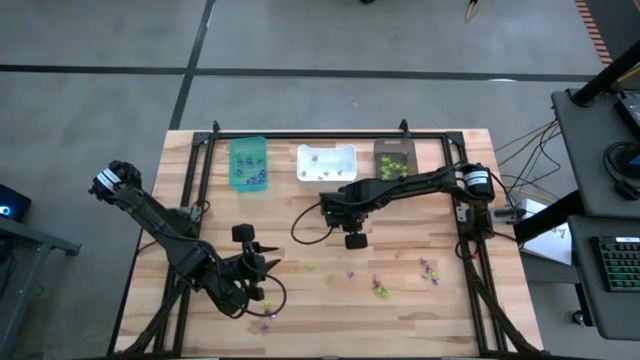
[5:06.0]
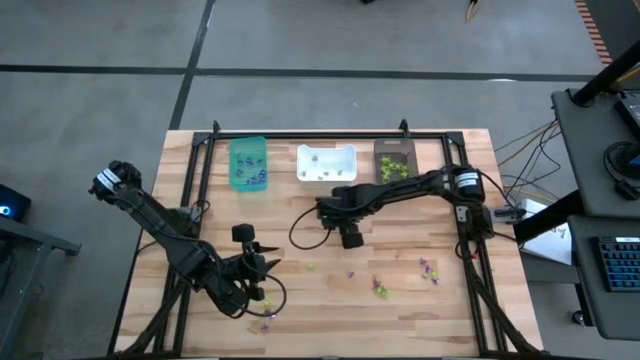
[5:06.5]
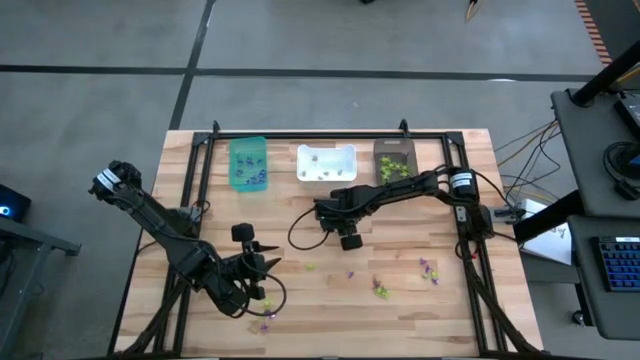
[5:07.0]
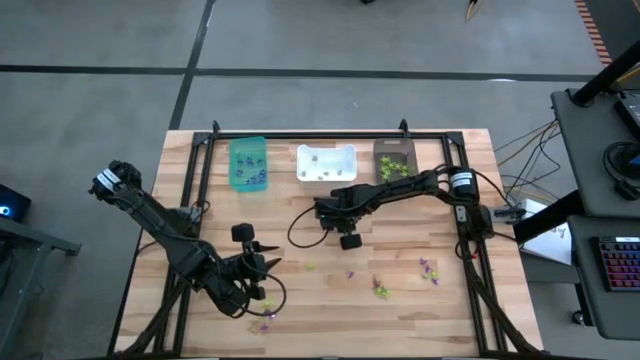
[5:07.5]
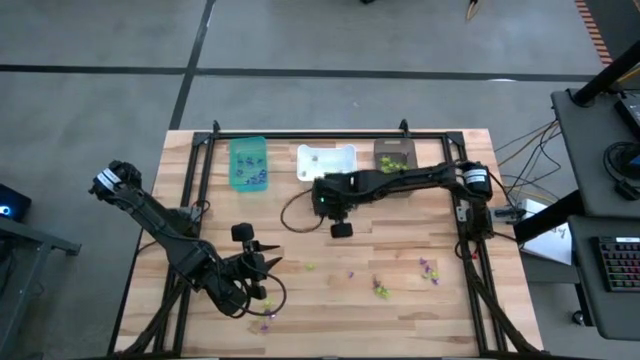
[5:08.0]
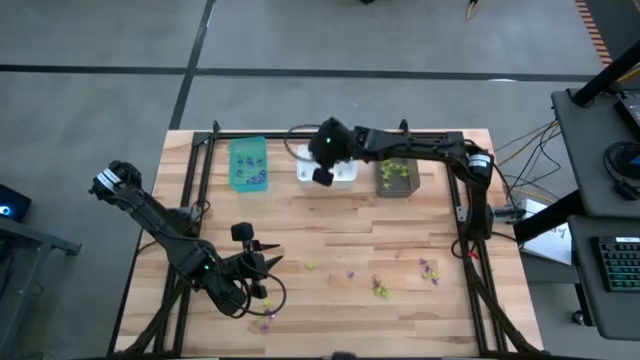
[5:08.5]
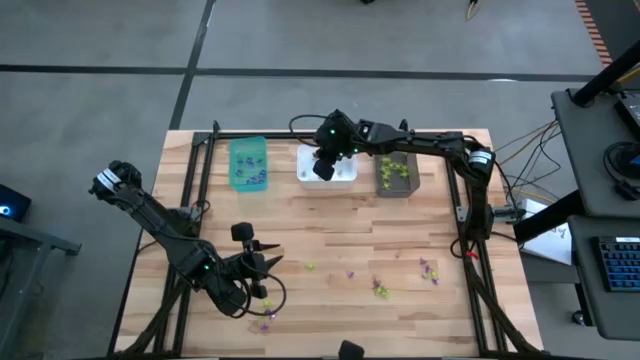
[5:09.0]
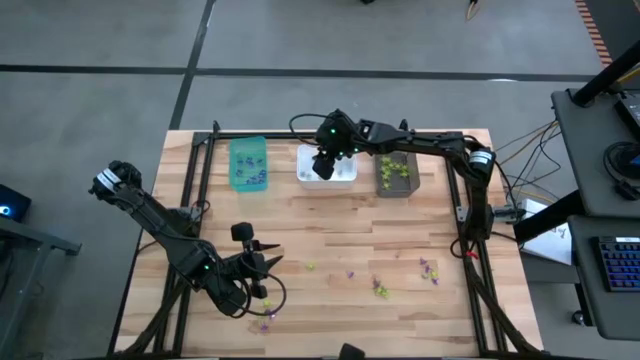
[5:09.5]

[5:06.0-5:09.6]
Task: Sort Halloween decoration
Put the white skull toy into the white bin

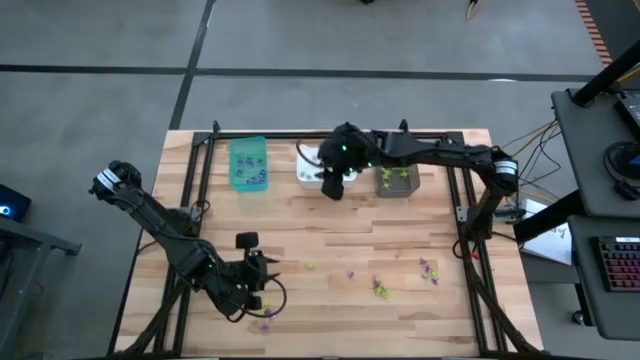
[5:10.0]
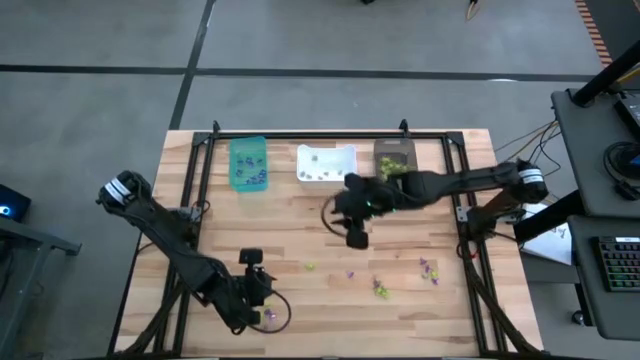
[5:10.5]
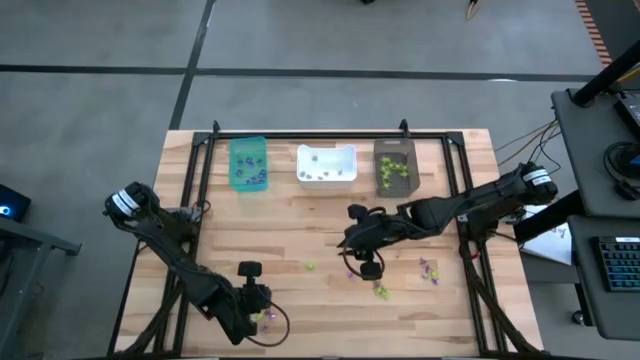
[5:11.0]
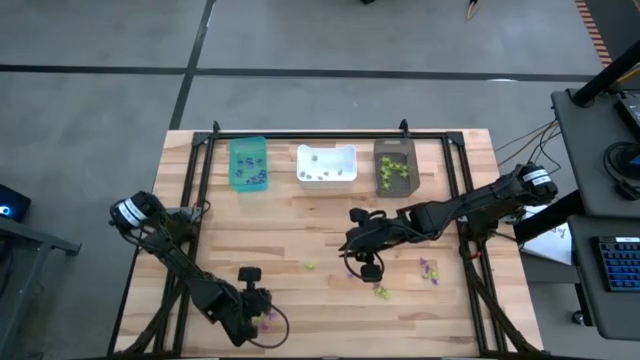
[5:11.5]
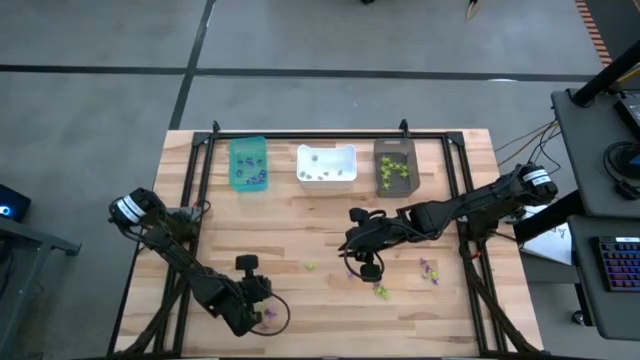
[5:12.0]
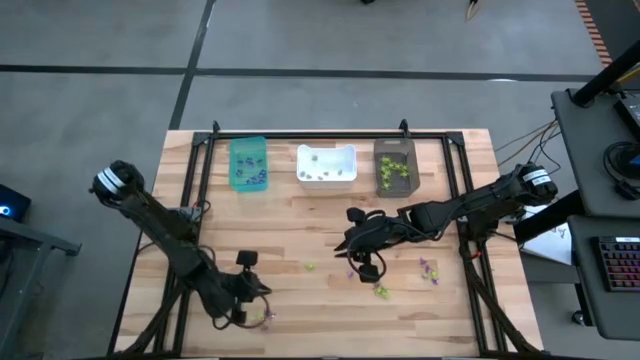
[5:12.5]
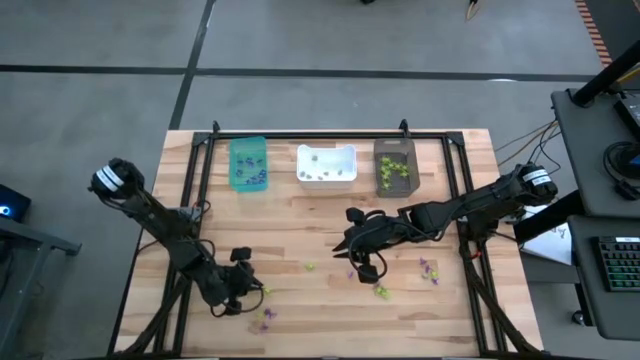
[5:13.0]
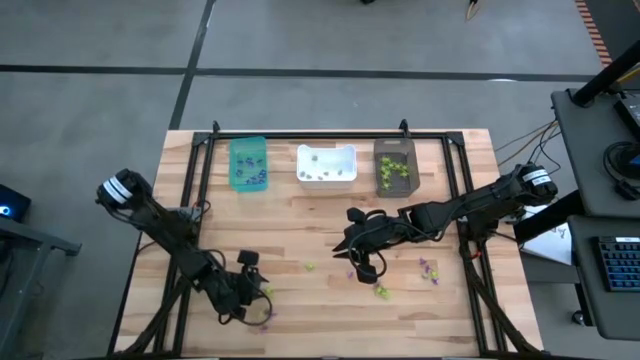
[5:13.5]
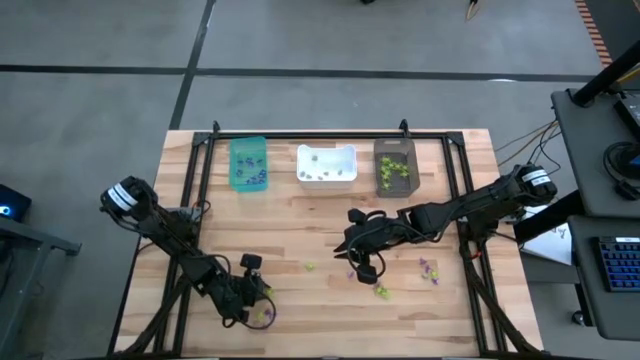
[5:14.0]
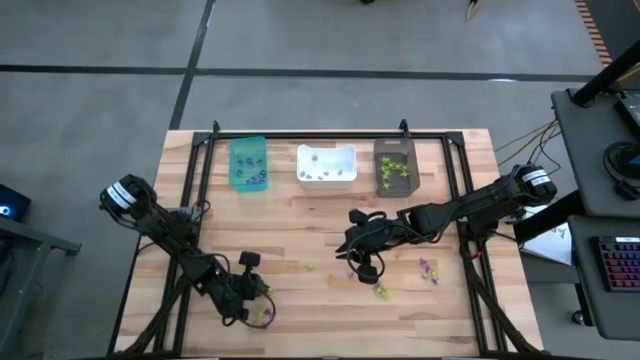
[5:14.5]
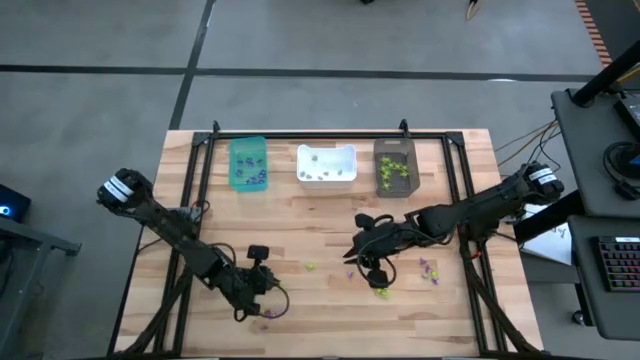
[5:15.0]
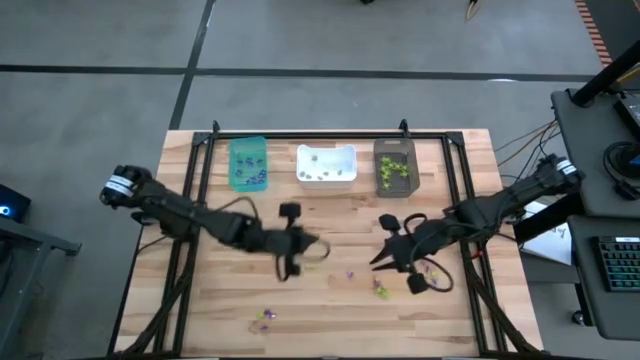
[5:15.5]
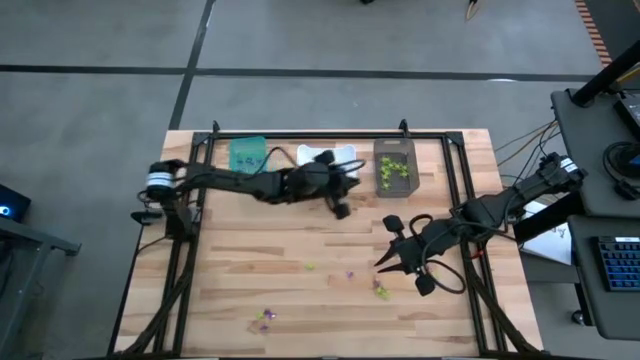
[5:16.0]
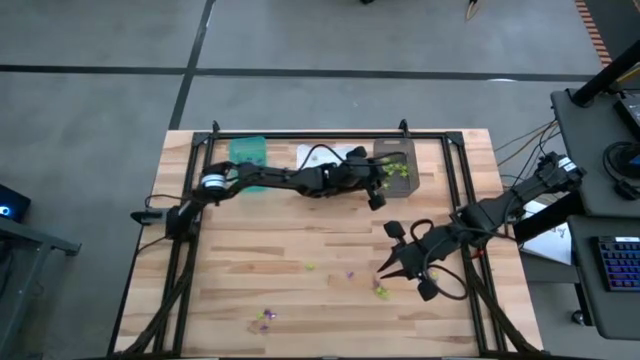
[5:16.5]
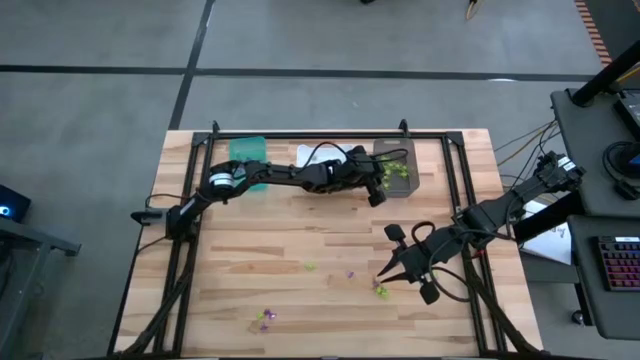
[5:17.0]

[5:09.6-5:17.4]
Put the green spider toy into the black bin

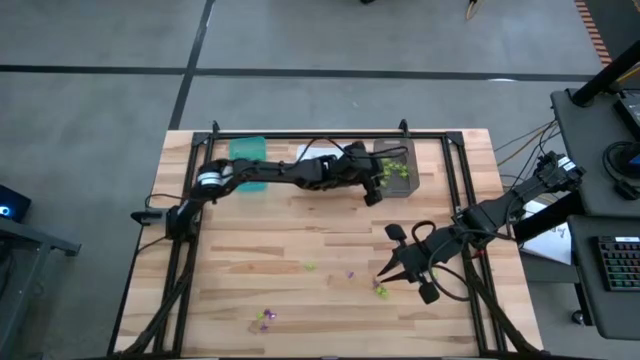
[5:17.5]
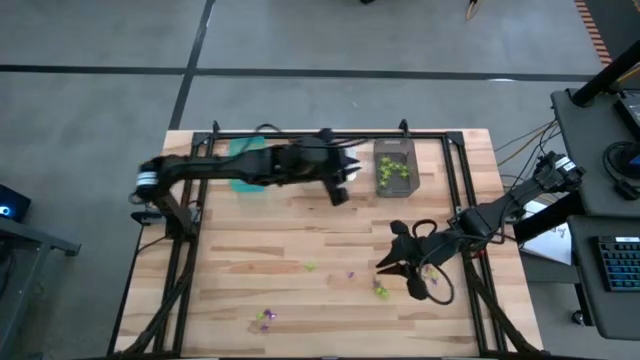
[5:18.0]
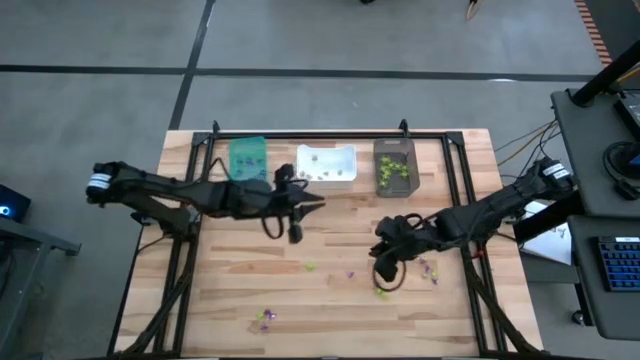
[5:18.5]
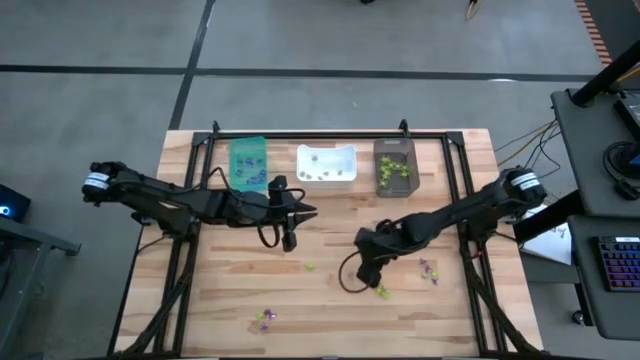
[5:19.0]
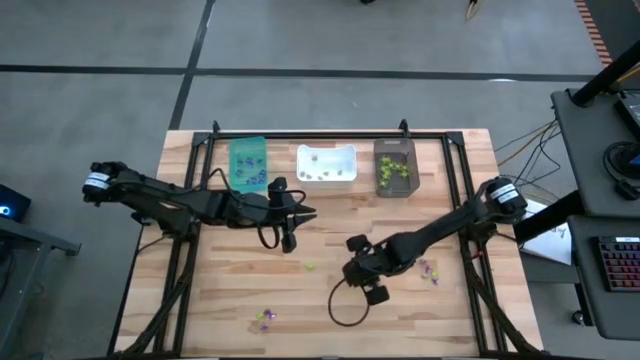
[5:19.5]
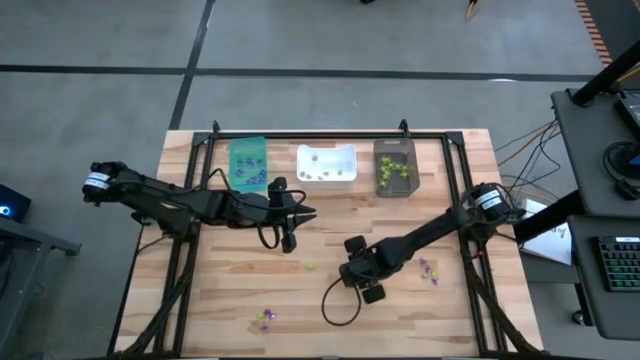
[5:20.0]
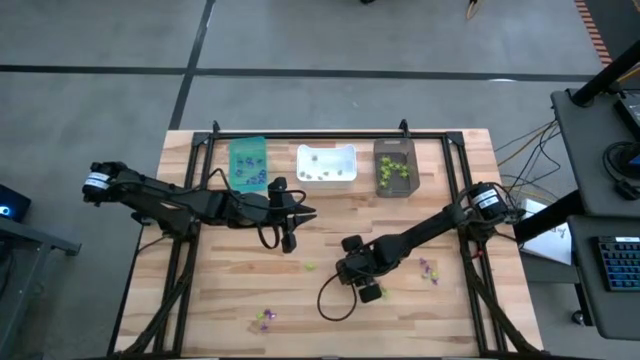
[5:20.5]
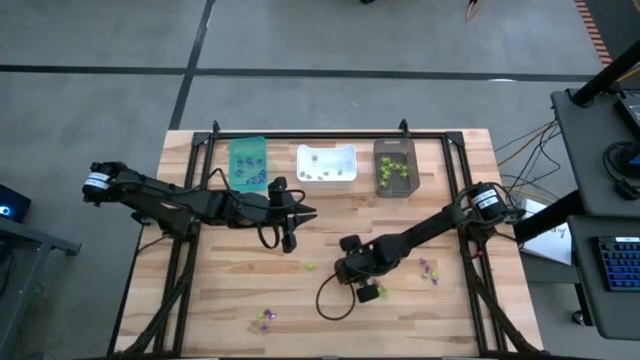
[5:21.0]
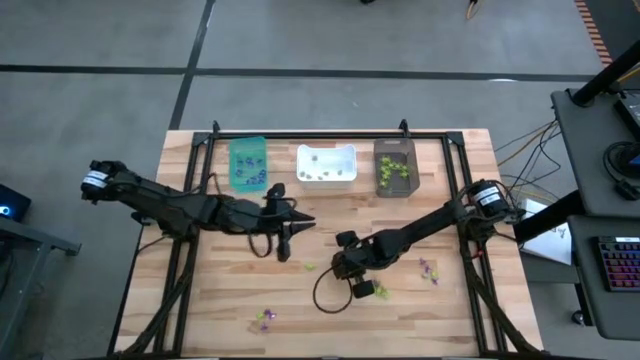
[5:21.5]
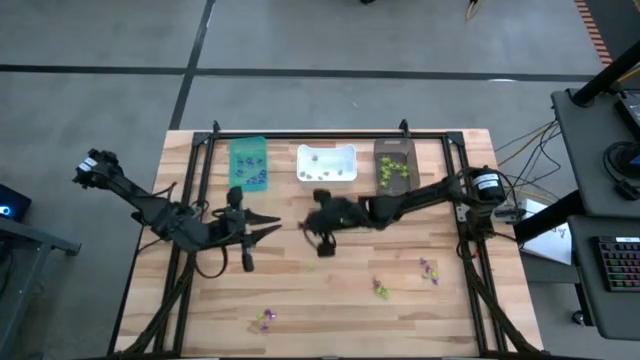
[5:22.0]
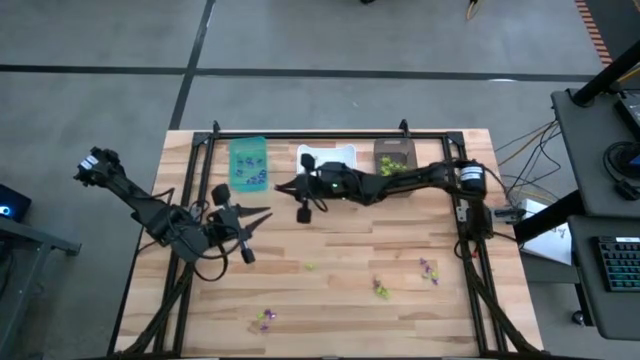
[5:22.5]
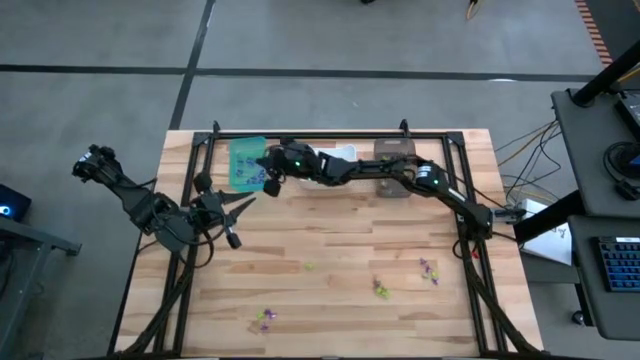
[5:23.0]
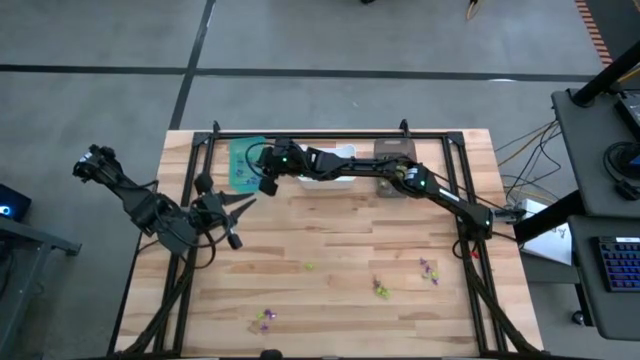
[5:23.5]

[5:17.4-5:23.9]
Put the purple witch hat into the light blue bin

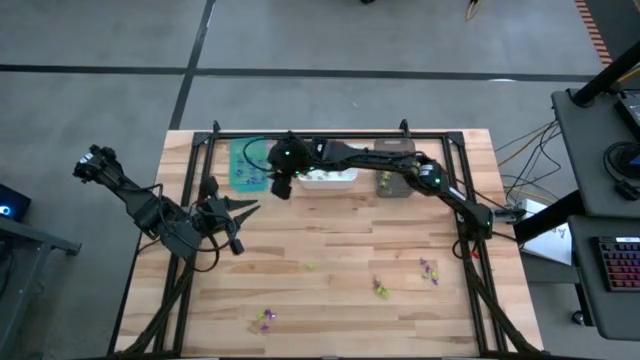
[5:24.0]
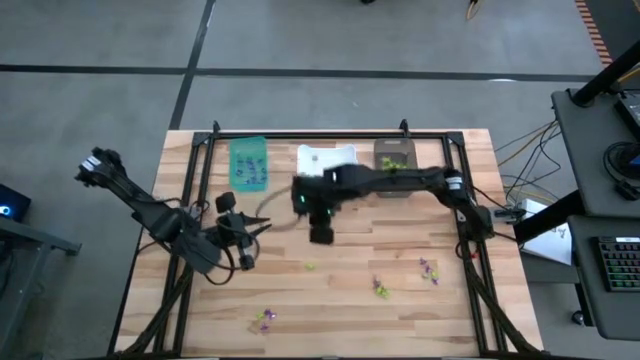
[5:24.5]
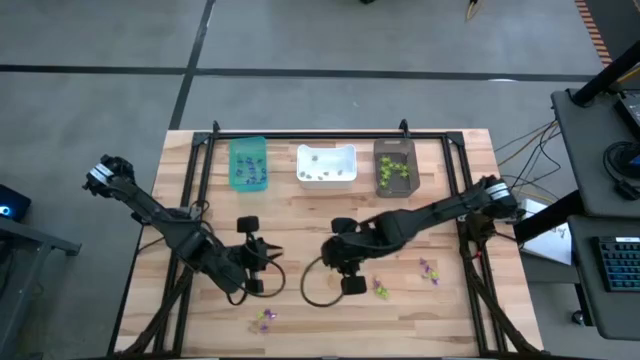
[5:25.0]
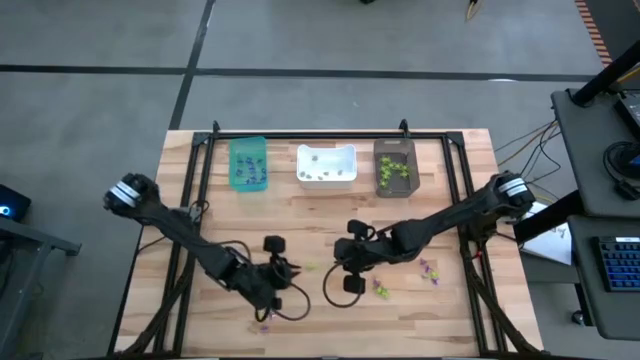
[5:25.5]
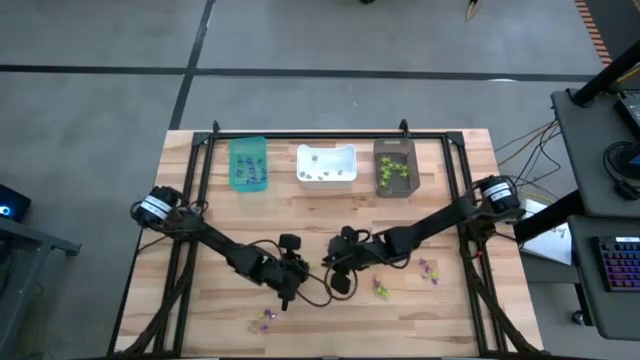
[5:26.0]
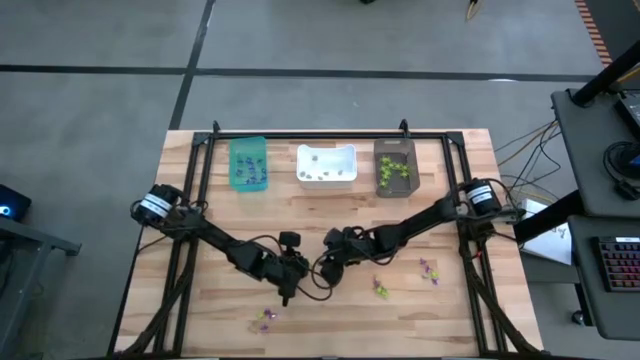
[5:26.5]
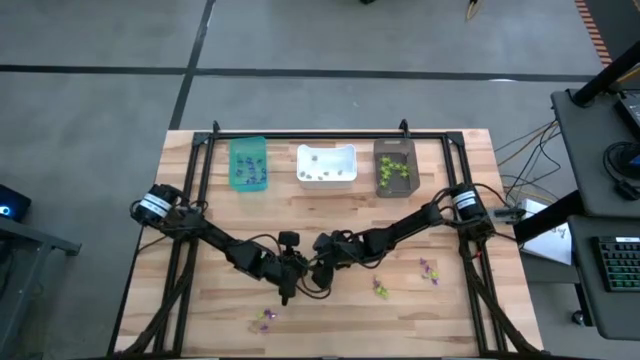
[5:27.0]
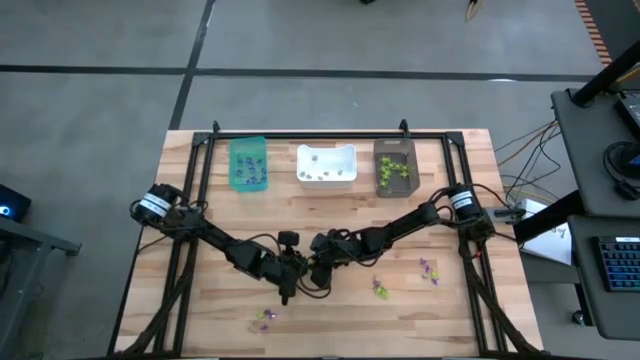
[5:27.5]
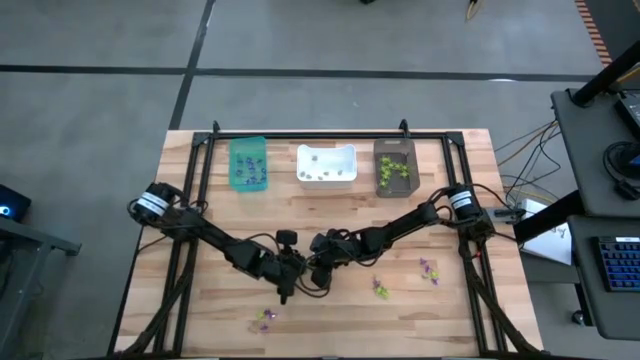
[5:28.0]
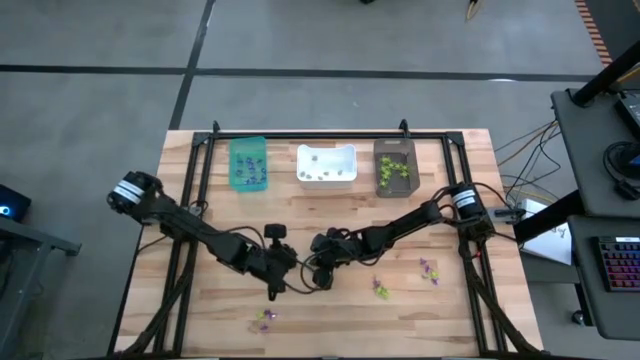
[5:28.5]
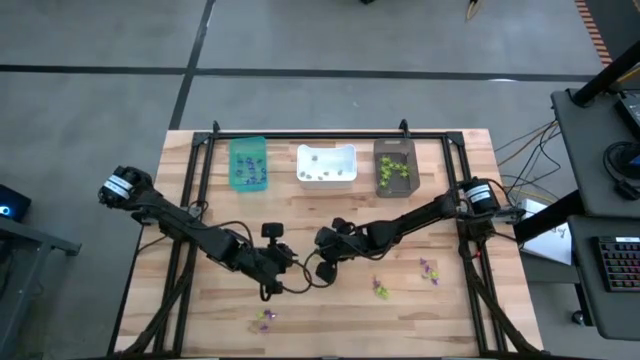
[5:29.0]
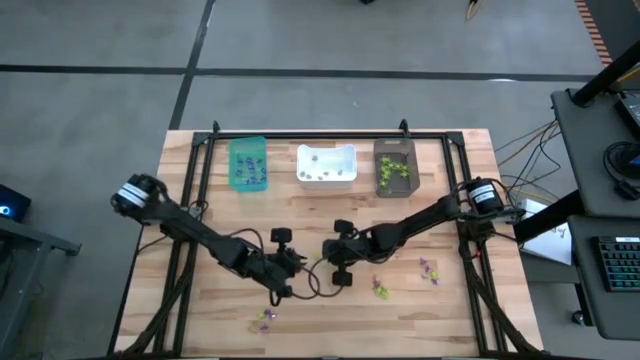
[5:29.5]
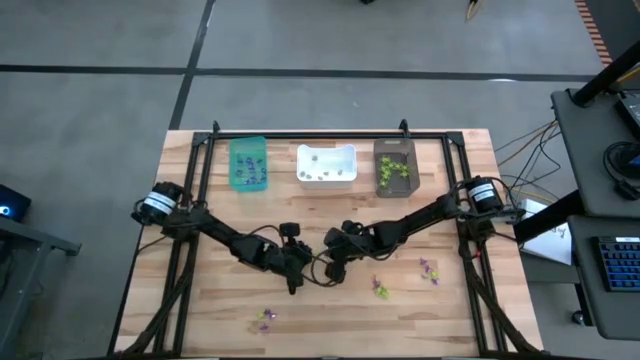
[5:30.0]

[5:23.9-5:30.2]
Put the green spider toy into the black bin
